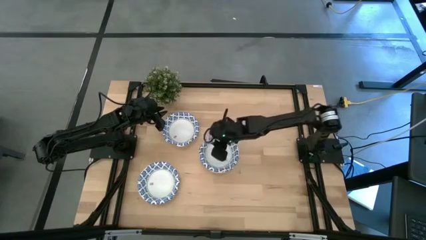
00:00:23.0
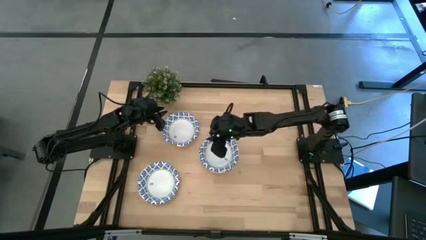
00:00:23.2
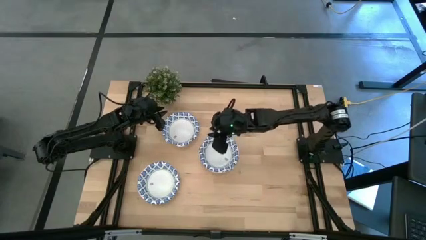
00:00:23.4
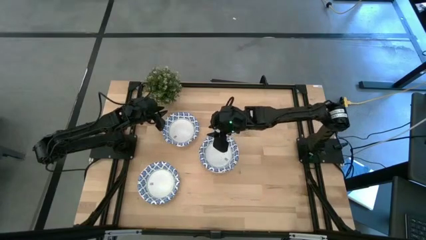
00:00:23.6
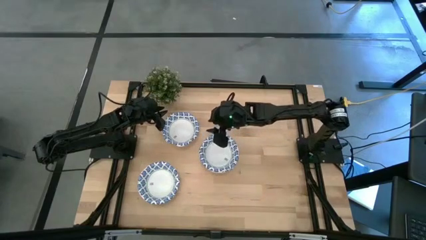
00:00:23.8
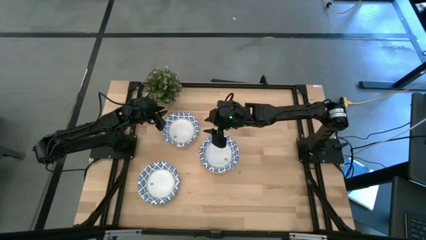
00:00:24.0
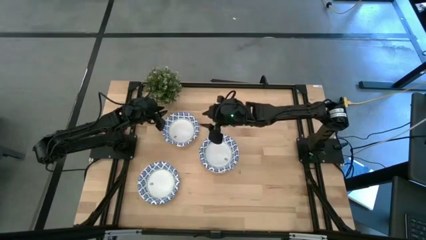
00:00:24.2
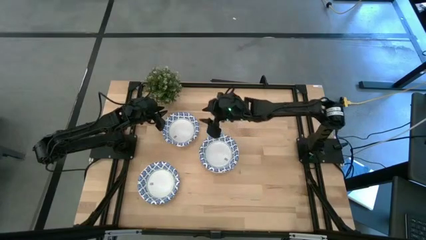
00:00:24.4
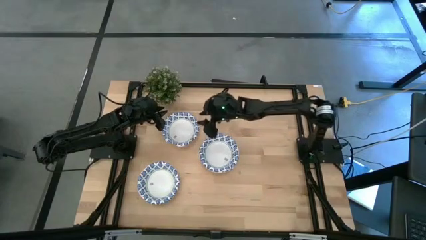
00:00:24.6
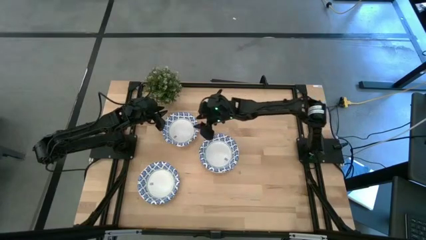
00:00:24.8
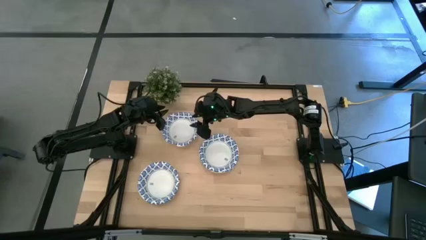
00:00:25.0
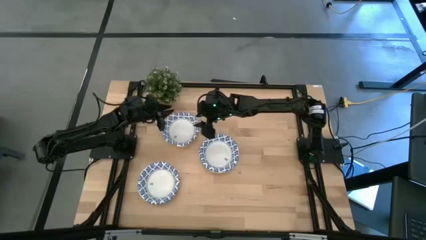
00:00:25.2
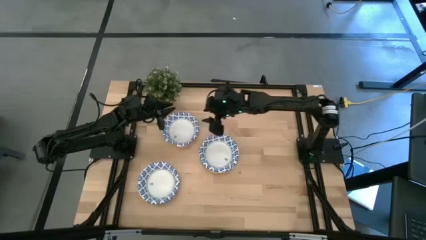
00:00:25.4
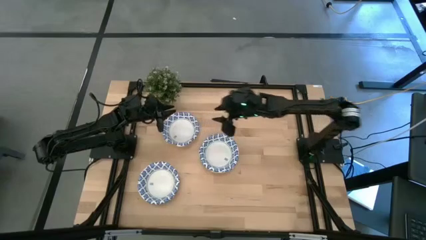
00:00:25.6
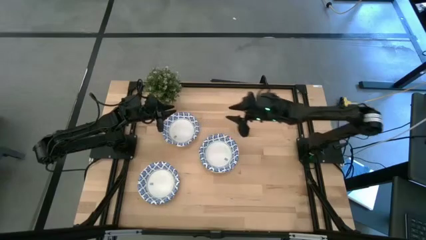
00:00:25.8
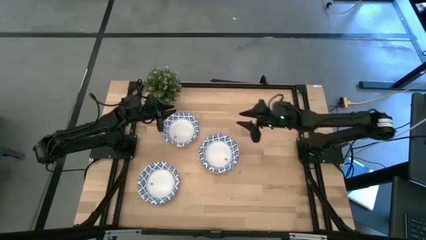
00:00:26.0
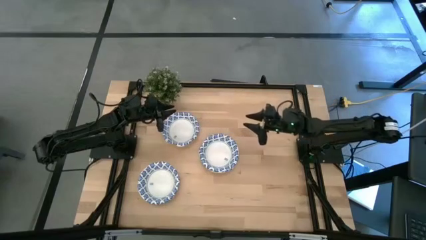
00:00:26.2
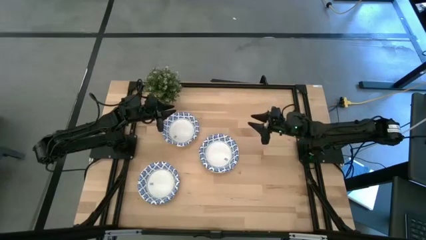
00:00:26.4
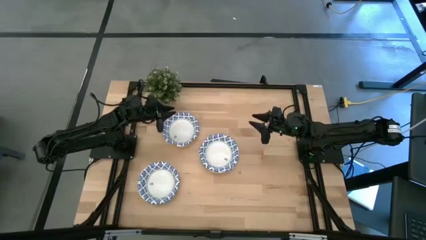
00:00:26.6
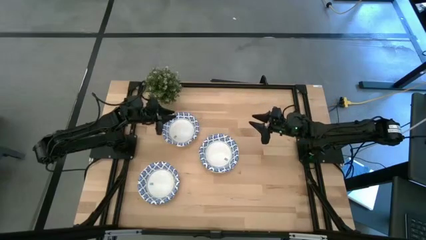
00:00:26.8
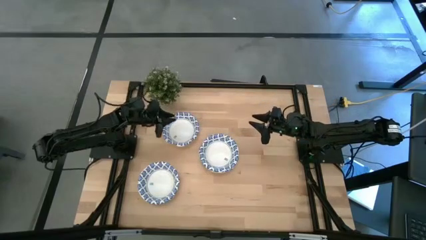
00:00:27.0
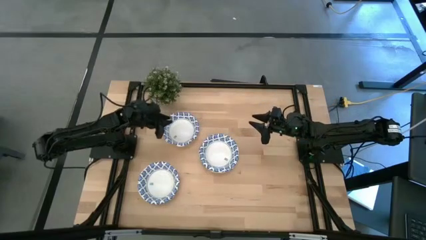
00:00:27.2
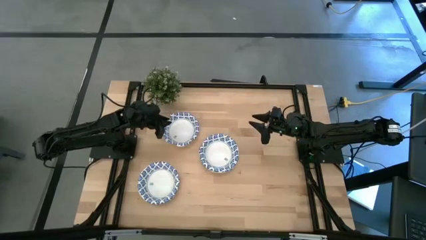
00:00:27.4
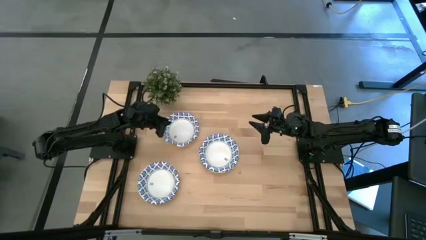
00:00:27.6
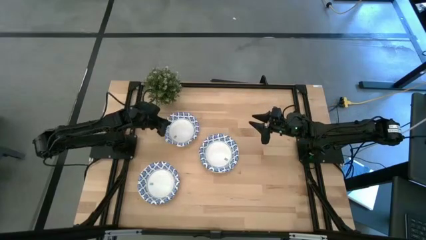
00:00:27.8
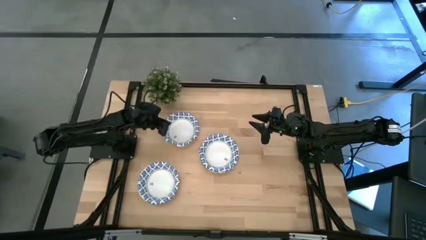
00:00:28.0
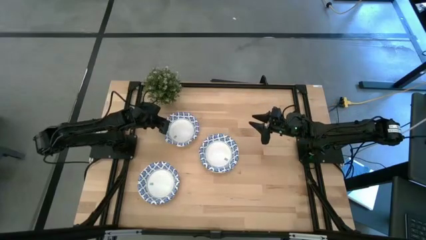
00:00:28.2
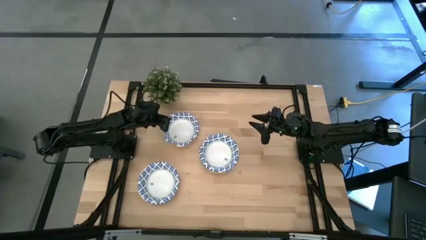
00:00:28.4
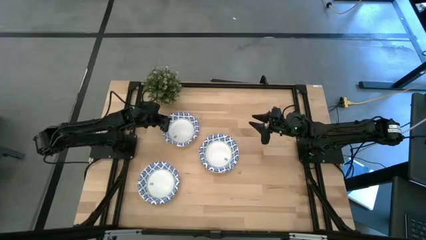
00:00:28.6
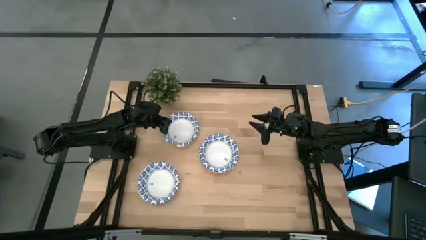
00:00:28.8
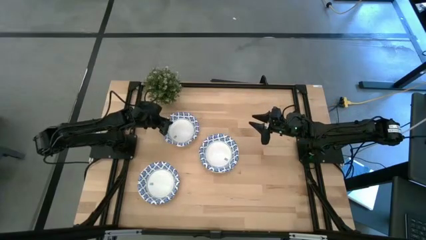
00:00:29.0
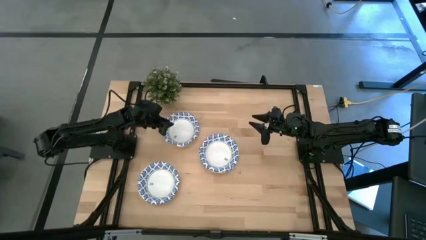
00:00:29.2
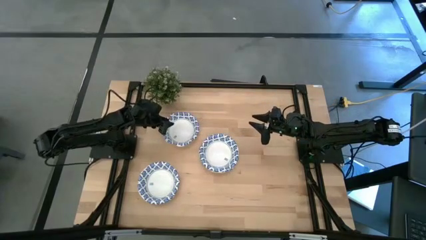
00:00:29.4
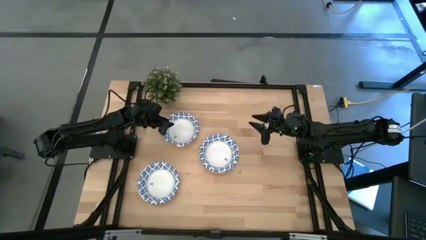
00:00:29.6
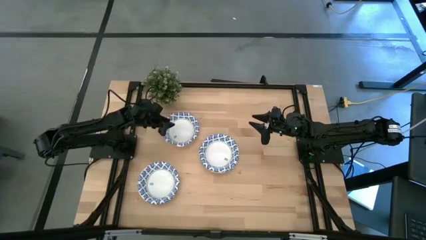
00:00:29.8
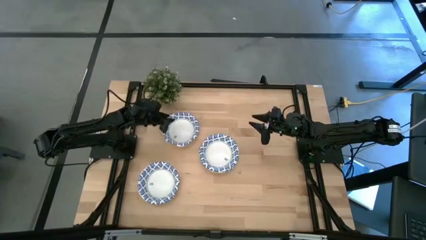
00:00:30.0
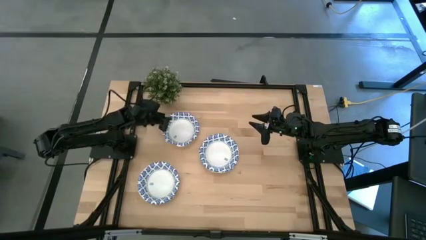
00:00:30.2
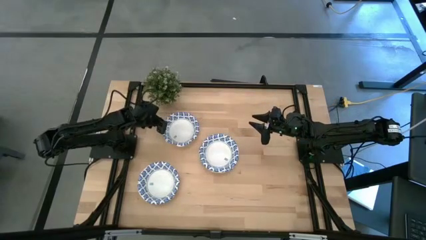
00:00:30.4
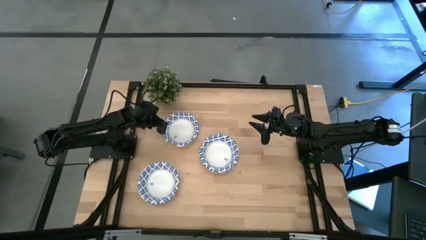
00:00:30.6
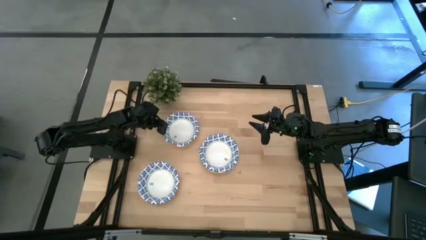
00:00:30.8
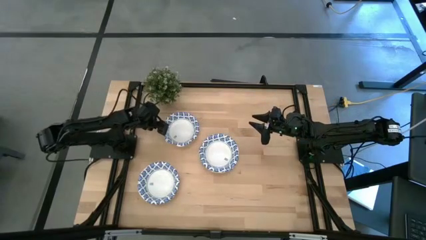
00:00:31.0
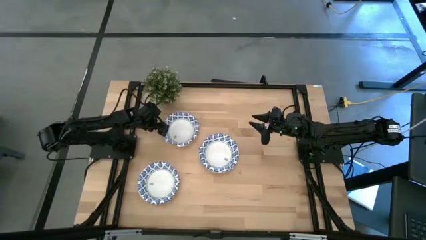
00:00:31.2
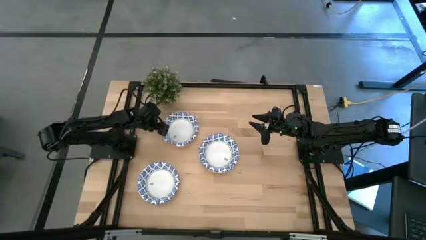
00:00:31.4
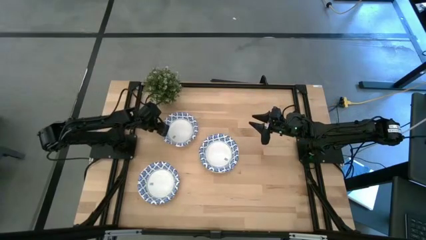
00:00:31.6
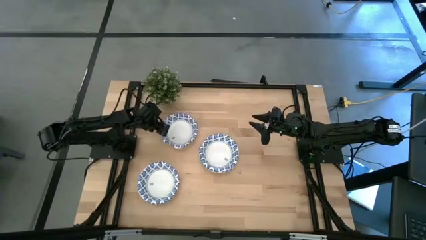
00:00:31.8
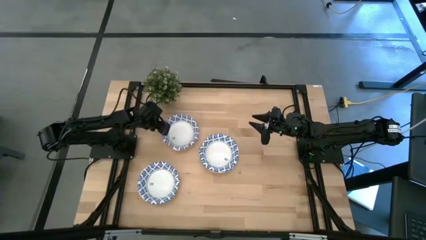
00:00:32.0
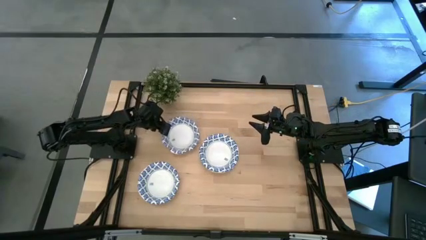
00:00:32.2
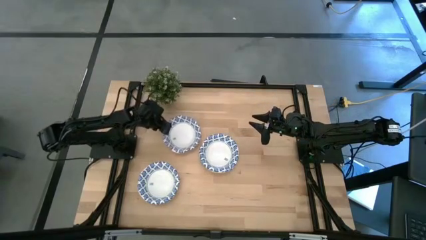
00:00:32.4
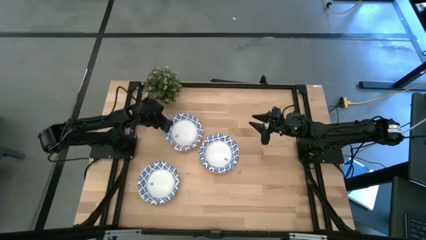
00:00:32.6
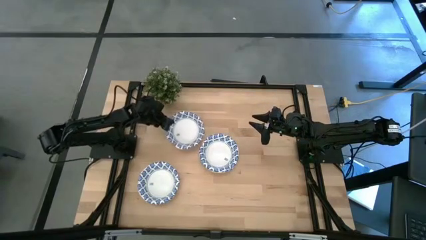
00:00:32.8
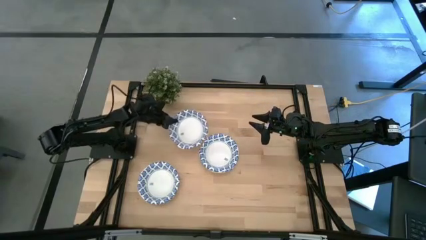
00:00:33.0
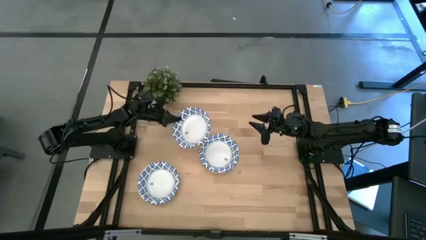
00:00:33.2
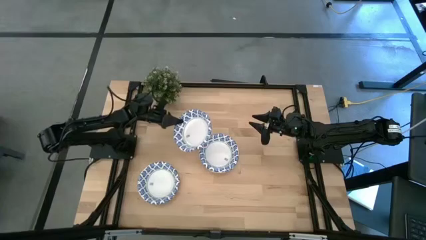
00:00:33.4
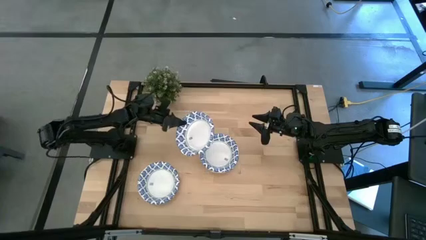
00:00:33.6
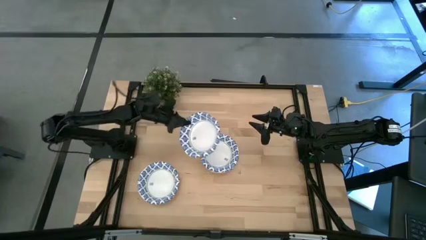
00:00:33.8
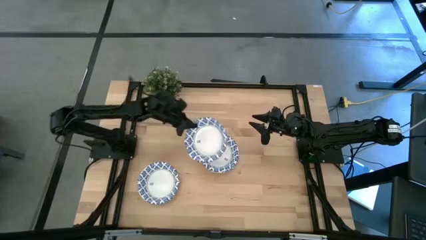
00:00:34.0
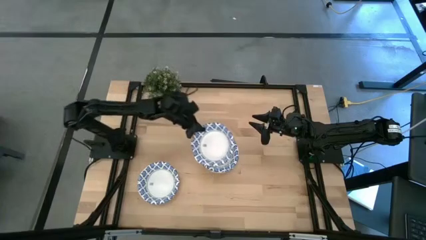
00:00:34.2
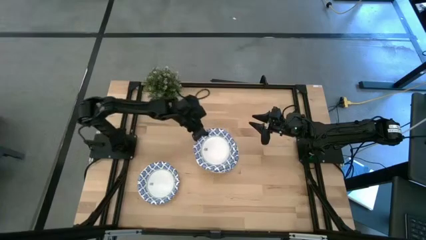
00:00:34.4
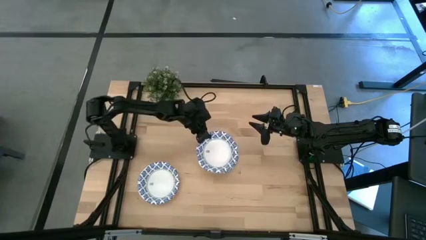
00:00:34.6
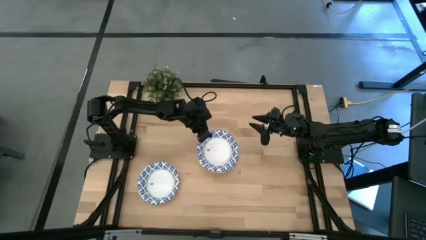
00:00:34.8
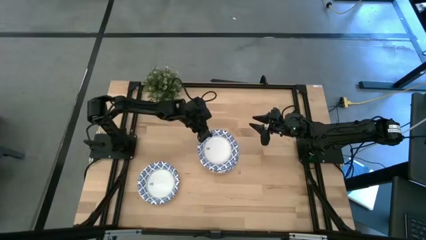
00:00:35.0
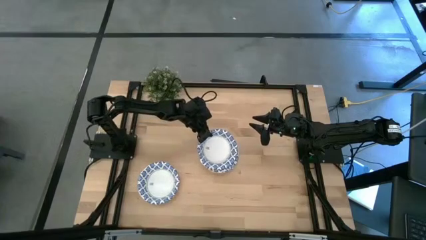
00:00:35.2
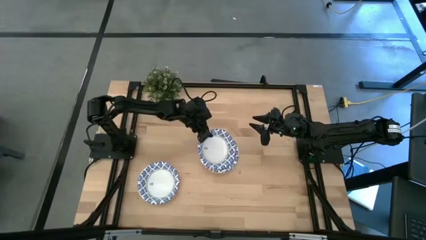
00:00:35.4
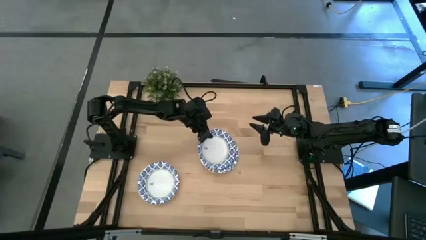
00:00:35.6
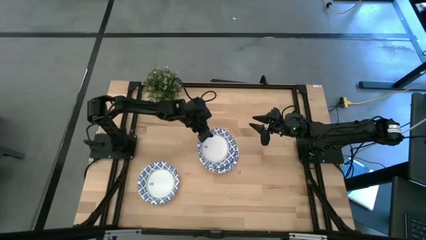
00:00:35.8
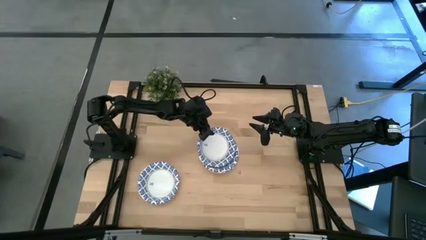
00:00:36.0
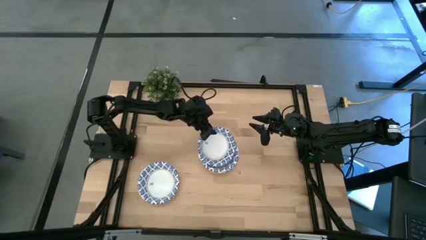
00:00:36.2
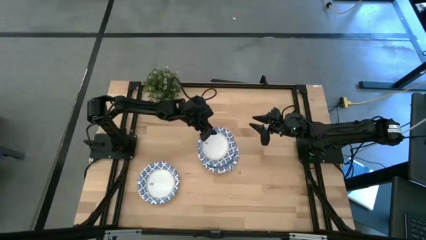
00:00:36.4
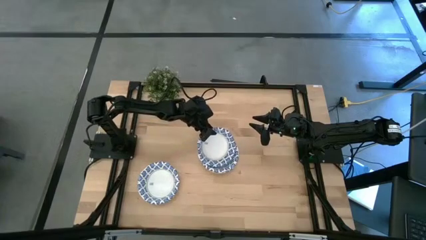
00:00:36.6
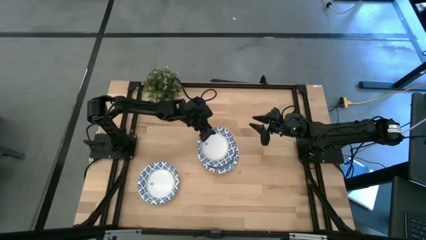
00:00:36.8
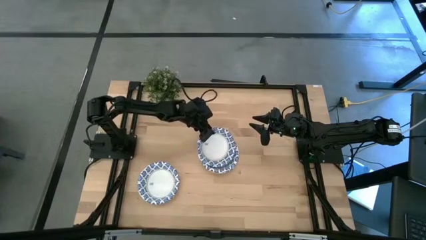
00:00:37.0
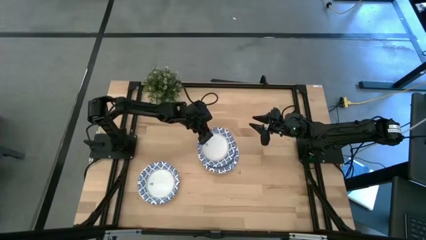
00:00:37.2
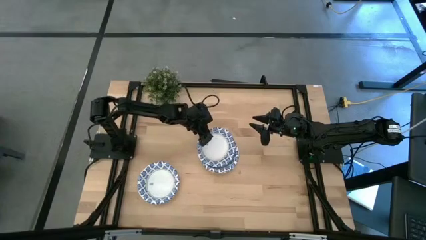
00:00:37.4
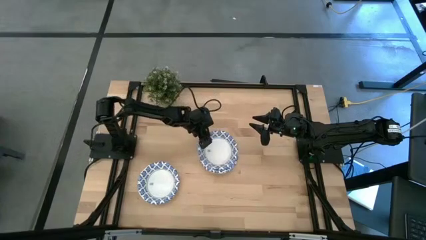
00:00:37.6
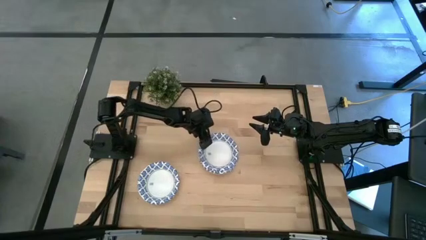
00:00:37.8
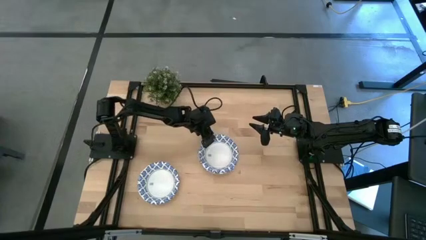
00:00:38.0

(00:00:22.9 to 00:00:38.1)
Task: Nest bowls inside each other
Stack the white bowl on top of the other white bowl
